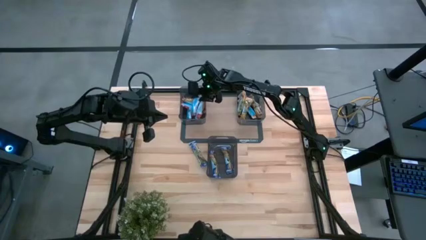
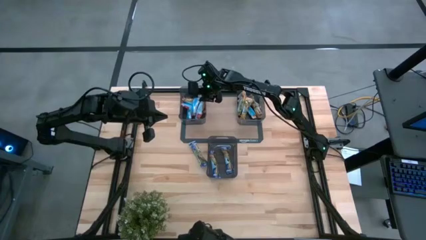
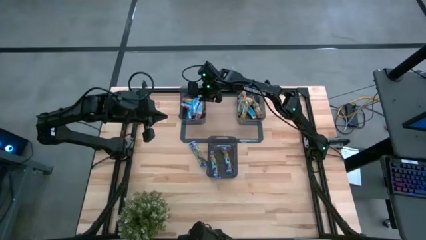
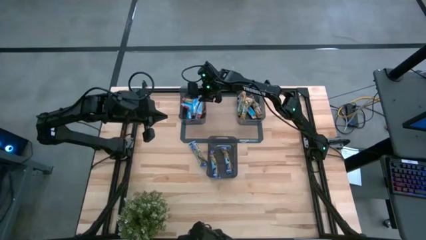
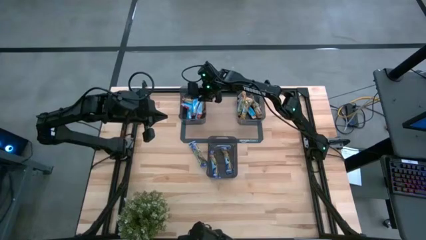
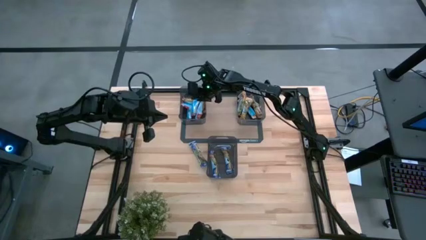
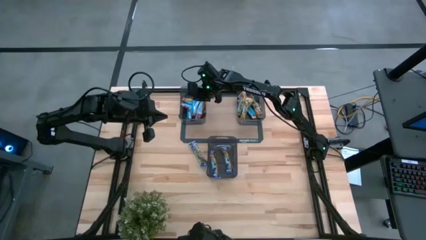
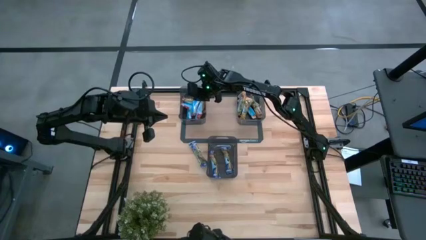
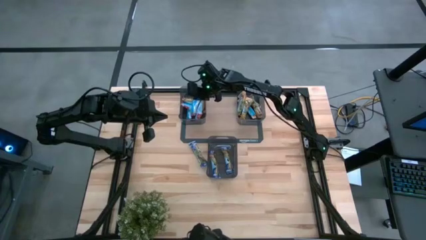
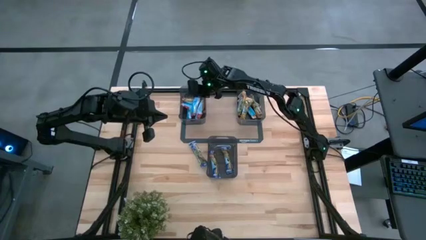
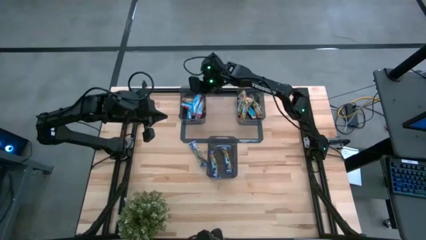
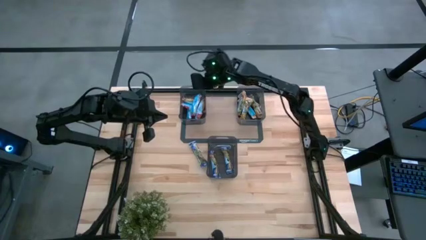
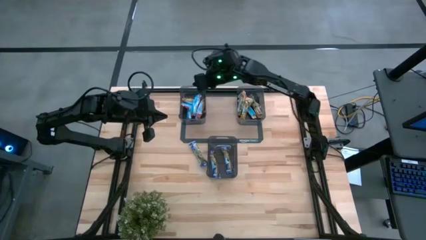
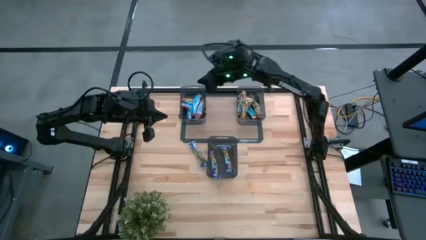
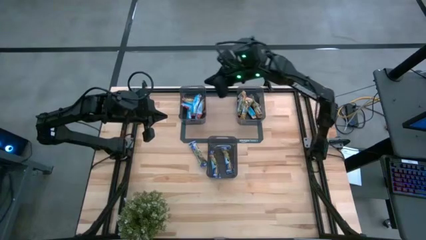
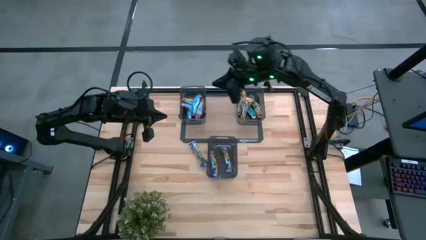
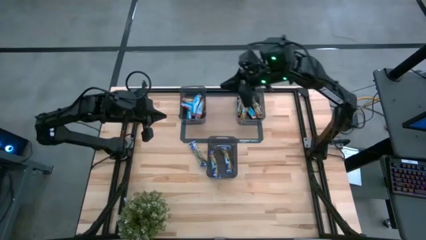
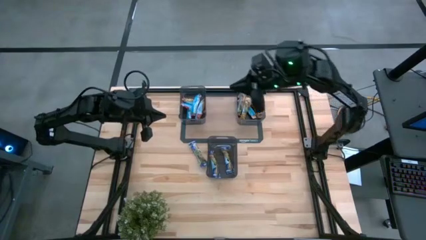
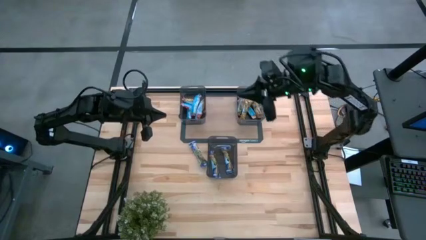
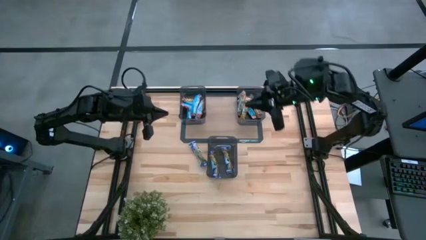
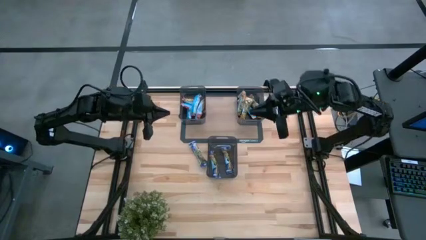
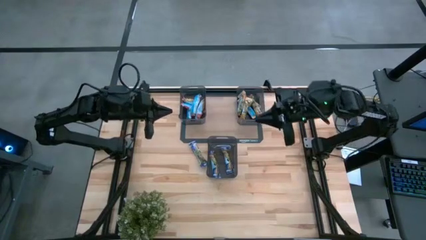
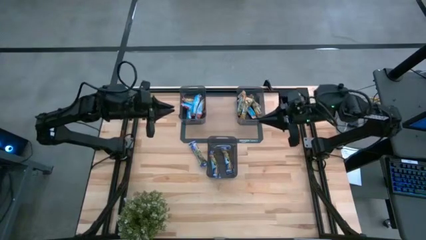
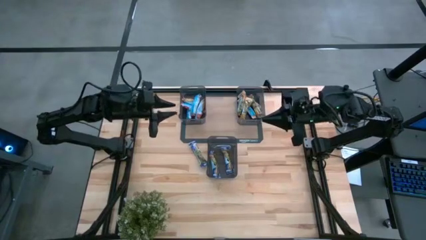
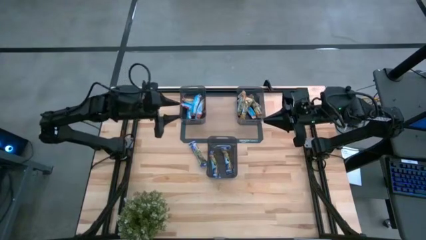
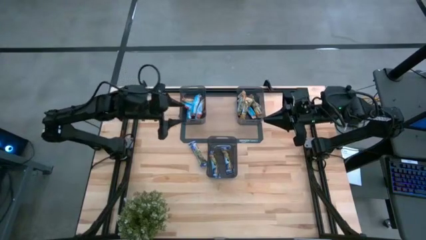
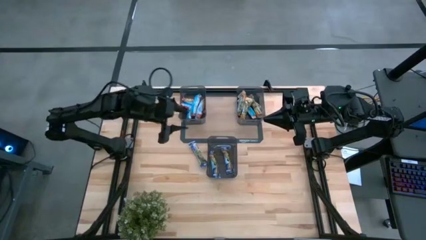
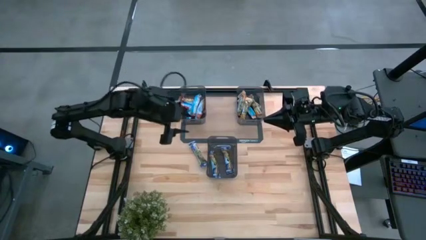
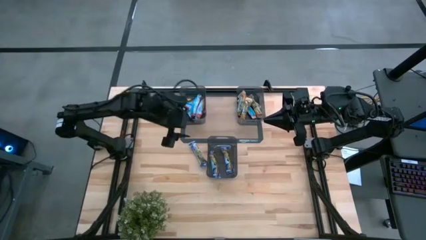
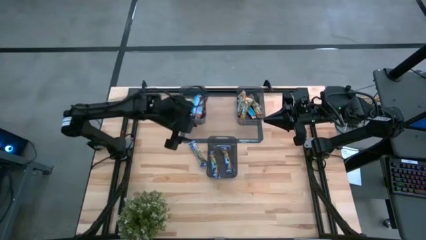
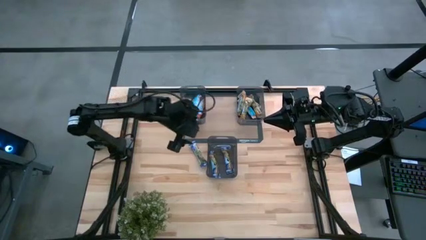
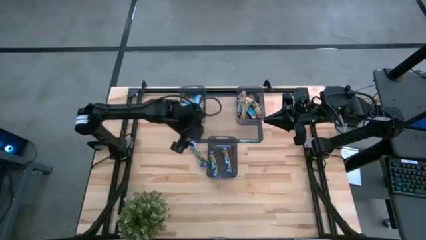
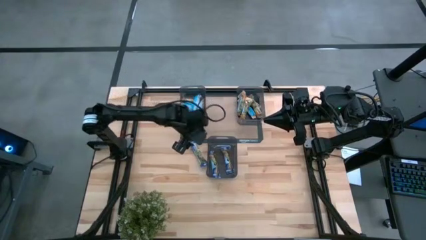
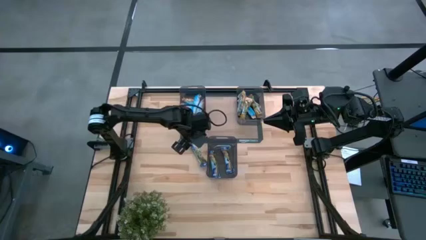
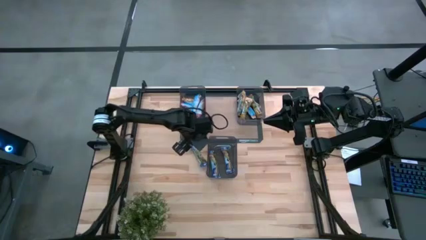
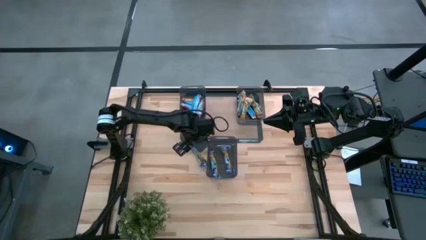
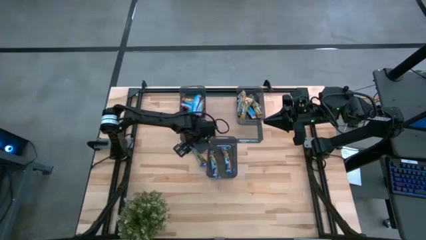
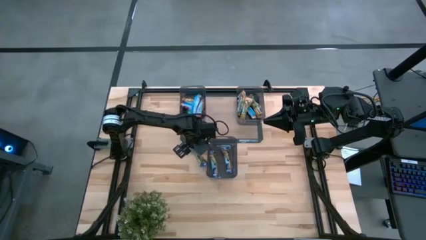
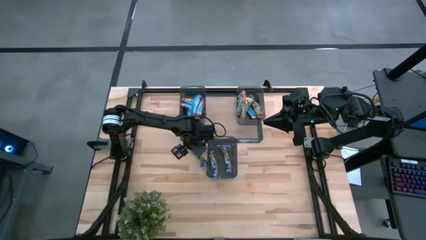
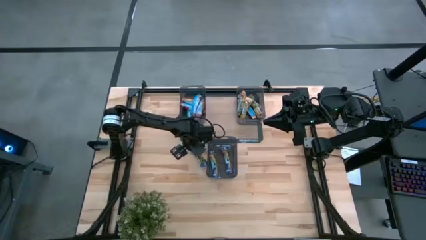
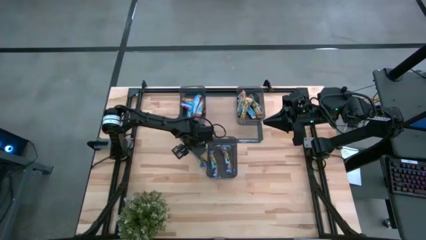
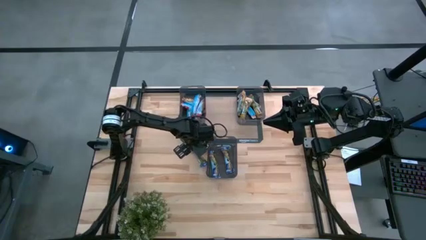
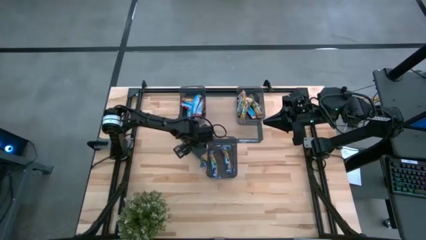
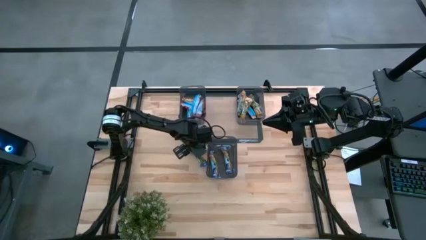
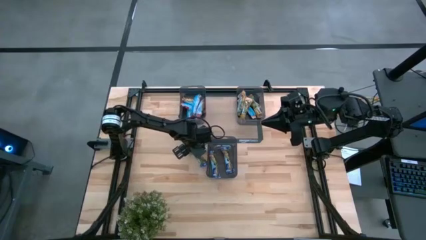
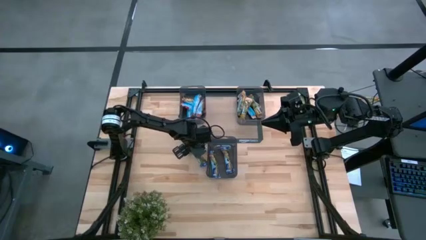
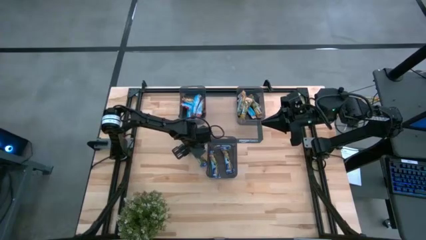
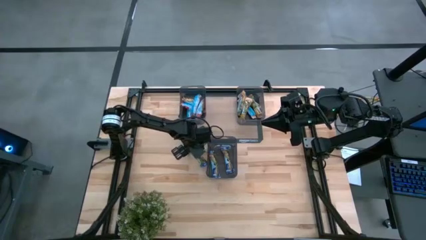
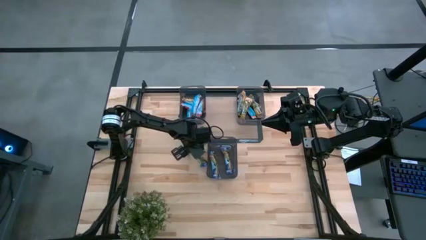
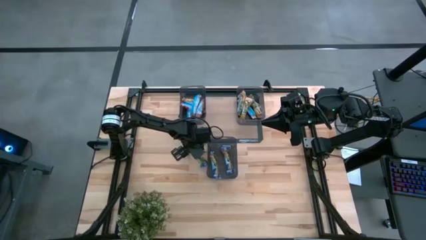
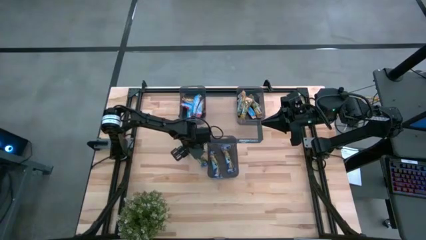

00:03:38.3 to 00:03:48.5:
Task: Pick and place Granola Bars by type
Put the blue granola bar into the bottom black bin

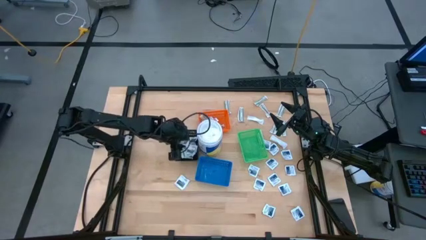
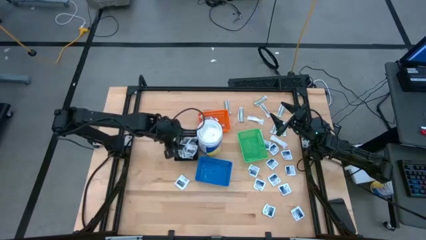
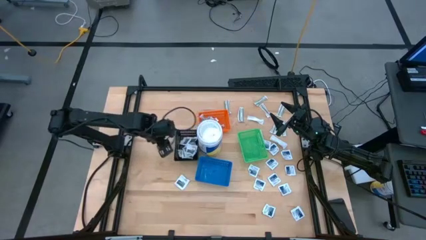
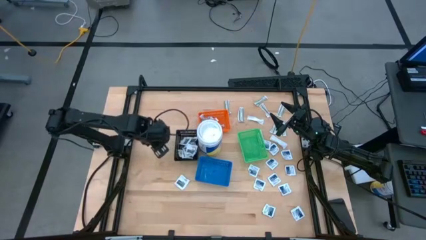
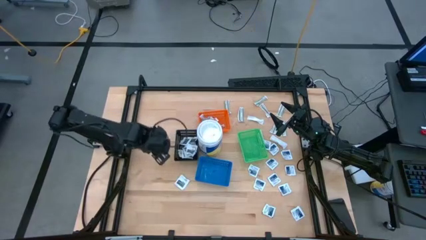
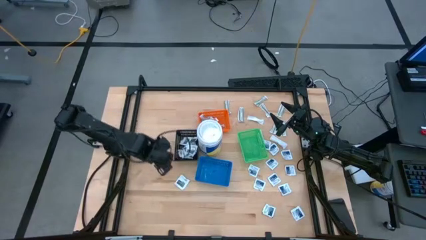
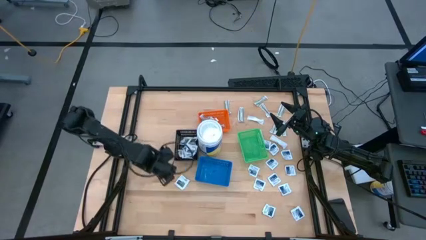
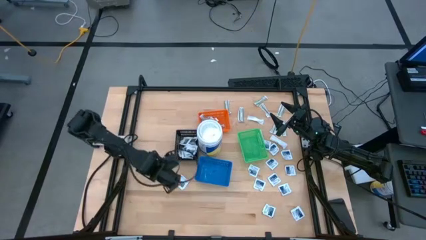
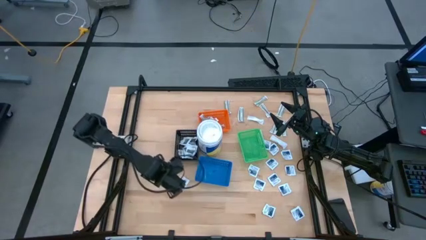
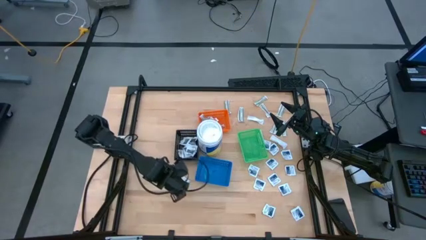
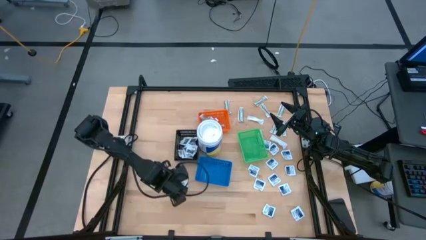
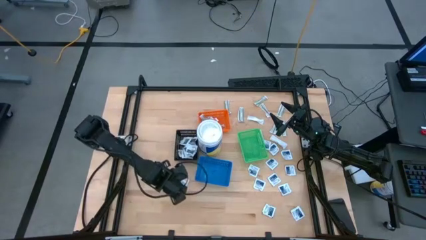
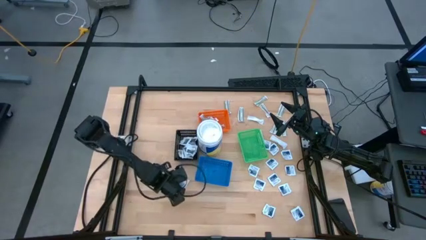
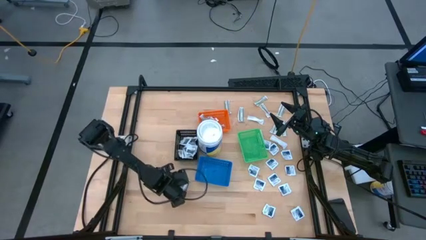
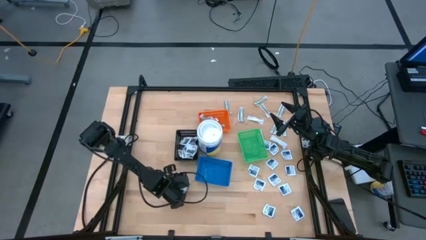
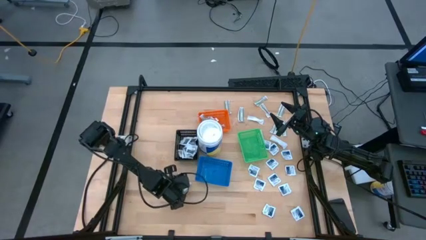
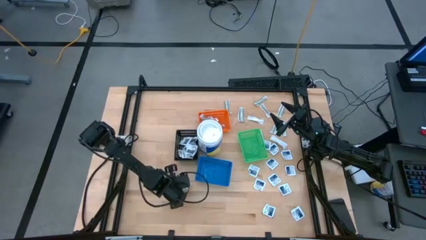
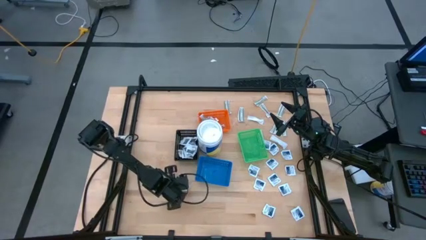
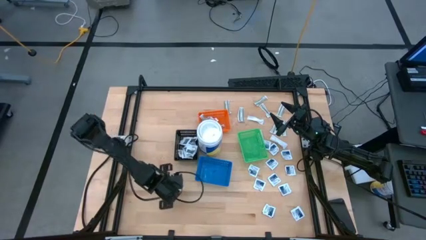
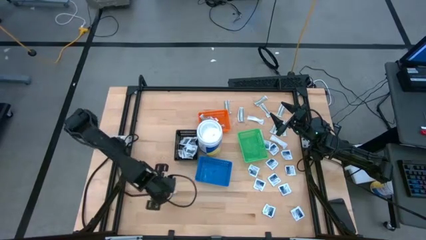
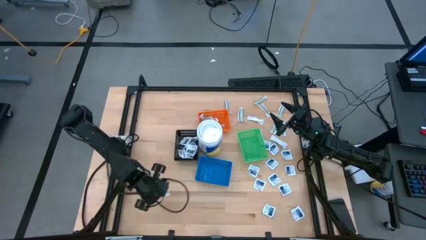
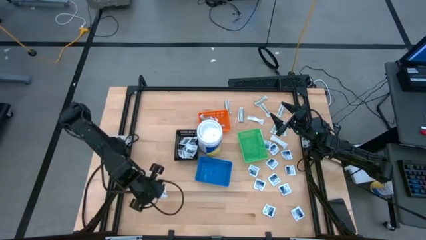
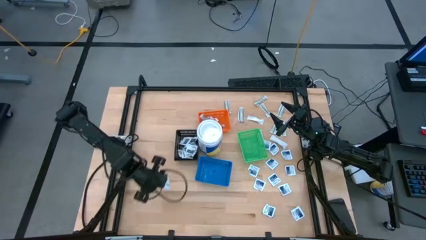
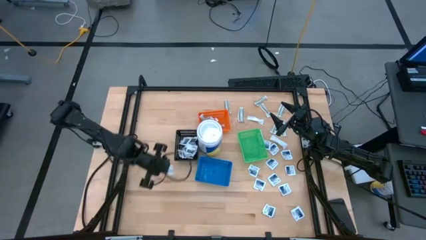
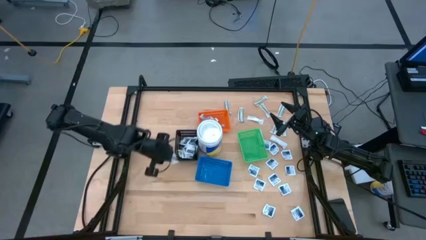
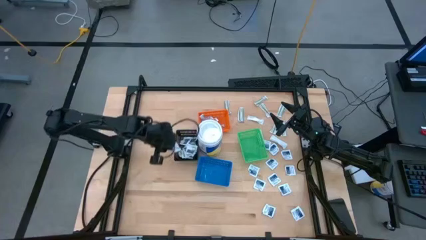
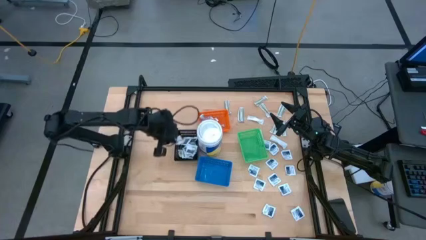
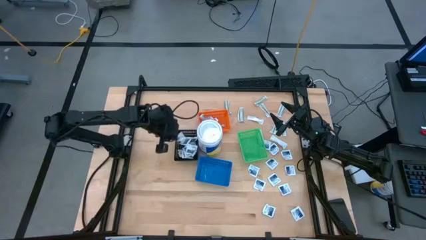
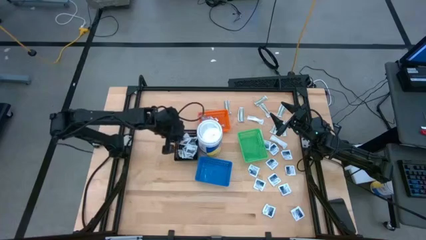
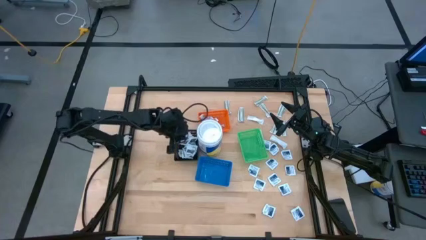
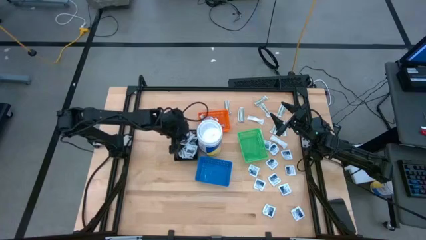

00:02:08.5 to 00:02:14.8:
Task: Pick & Place First Aid Supplies
Put the gray towelette pack into the black bin
